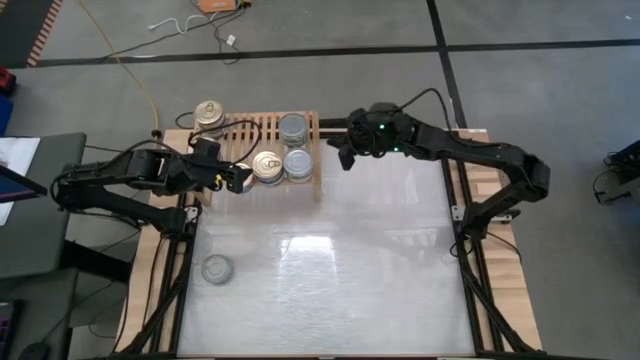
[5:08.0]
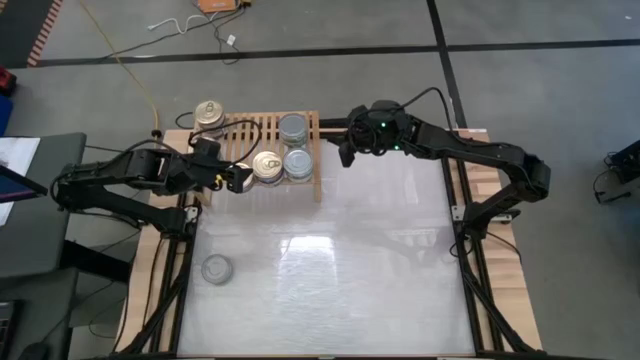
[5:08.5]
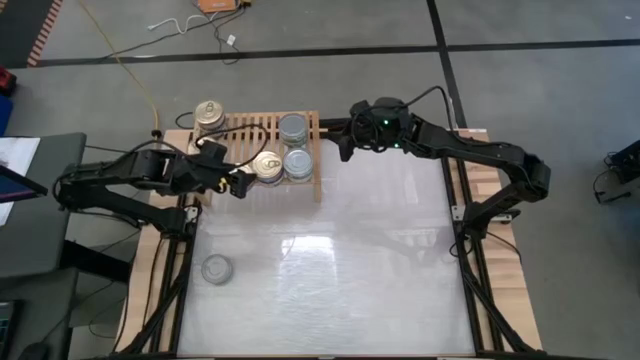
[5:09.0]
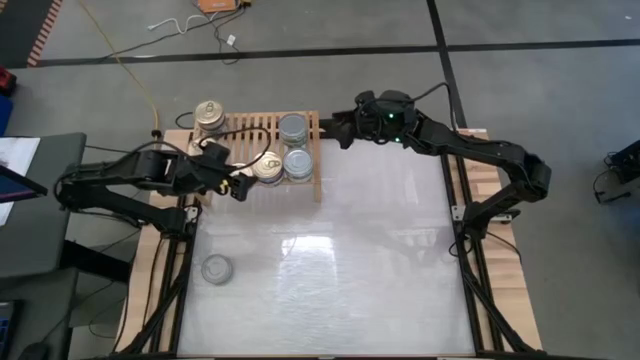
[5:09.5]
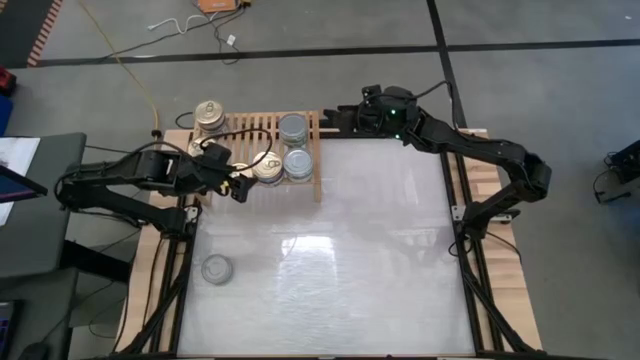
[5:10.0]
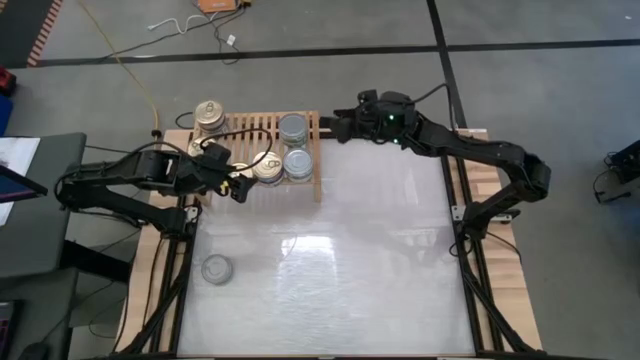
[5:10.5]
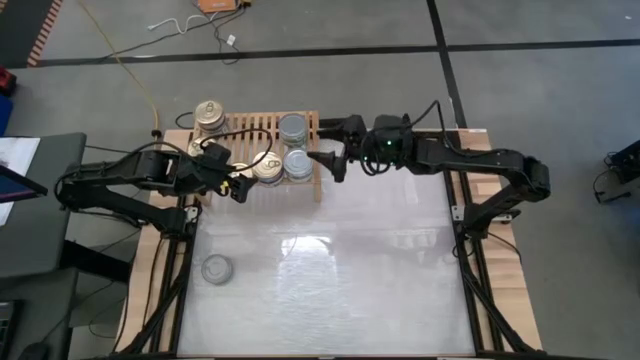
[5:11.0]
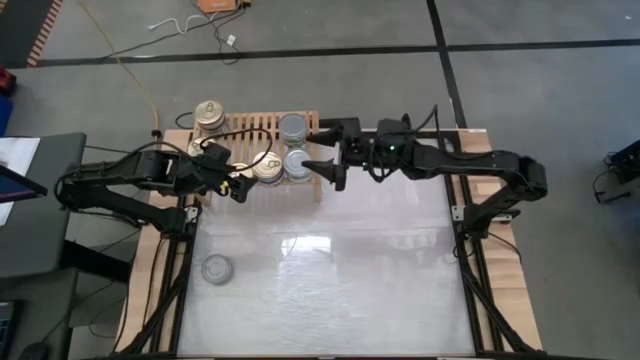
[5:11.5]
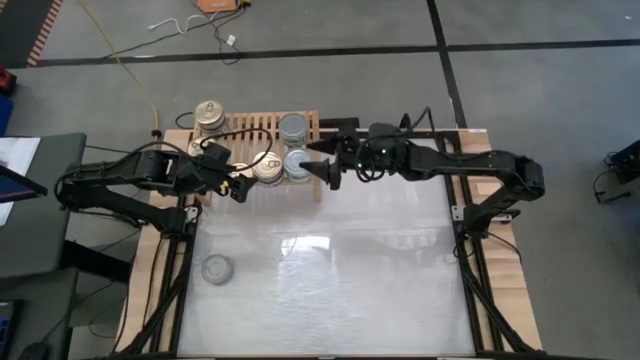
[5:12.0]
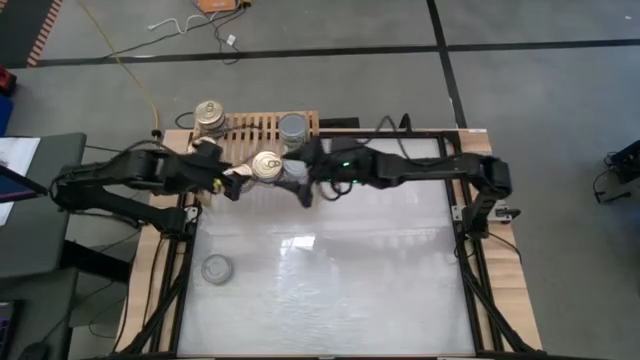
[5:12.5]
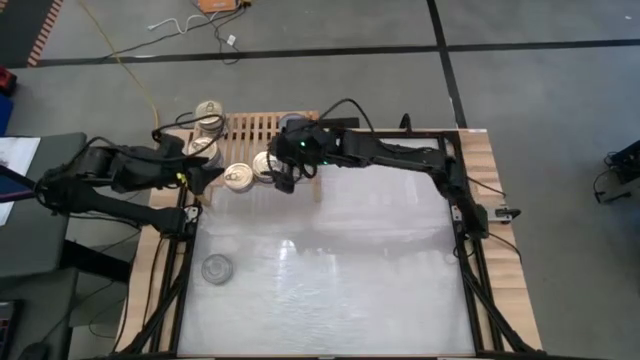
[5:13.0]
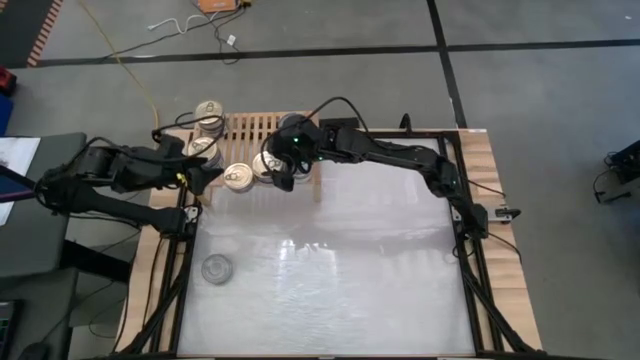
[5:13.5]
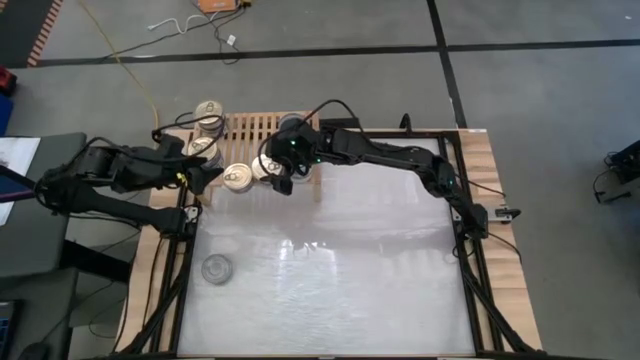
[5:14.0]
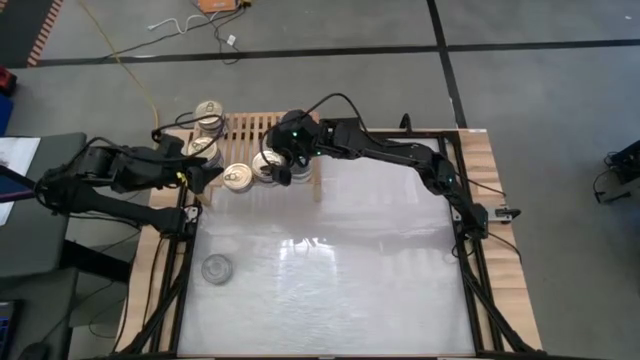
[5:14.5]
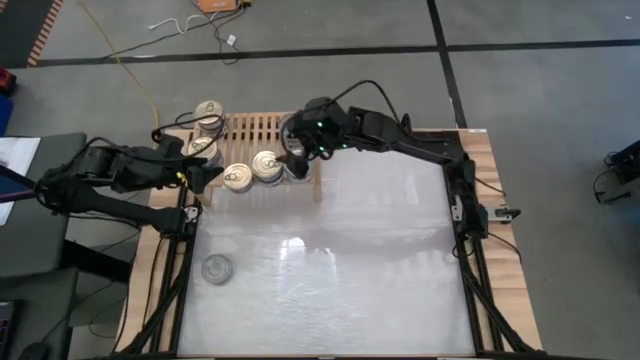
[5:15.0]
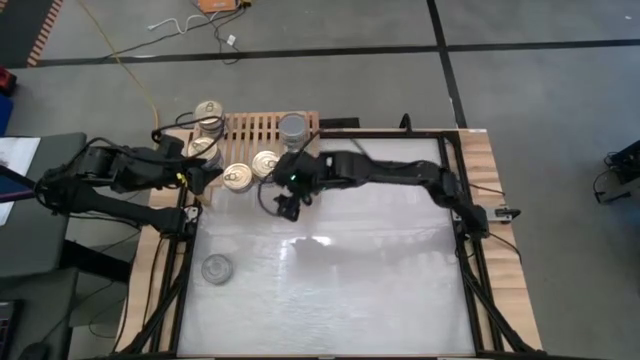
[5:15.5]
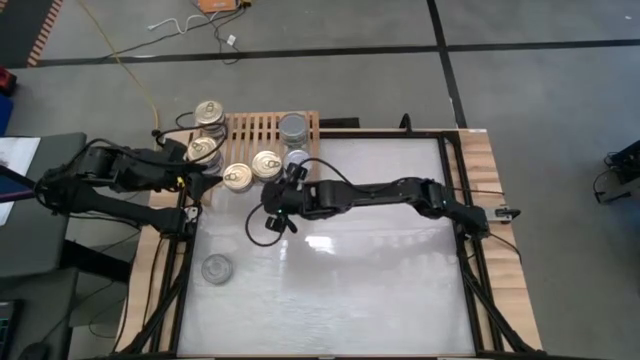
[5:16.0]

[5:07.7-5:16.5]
Task: Stack canned seafood by type on shelf
Adjust the bottom left stacked green tuna cans

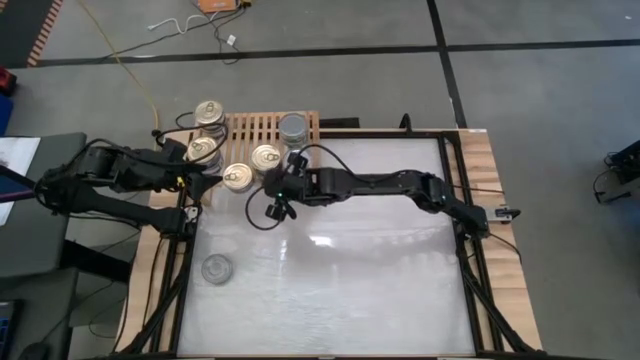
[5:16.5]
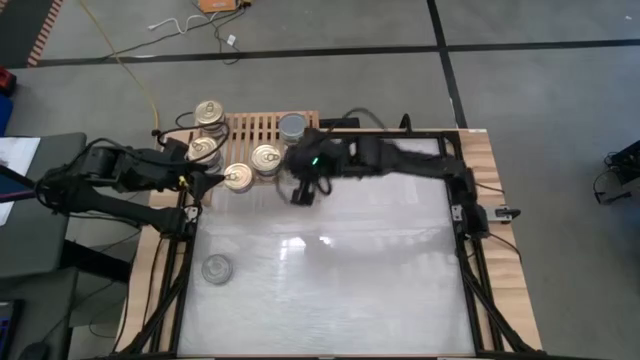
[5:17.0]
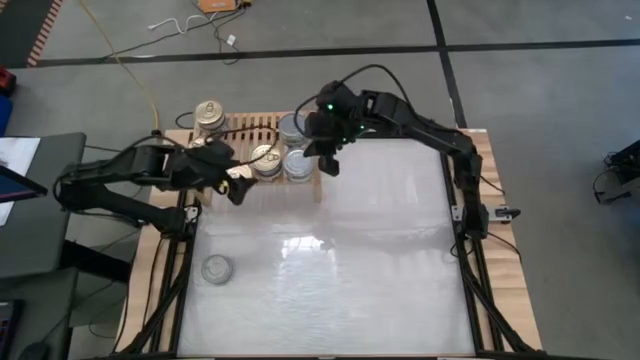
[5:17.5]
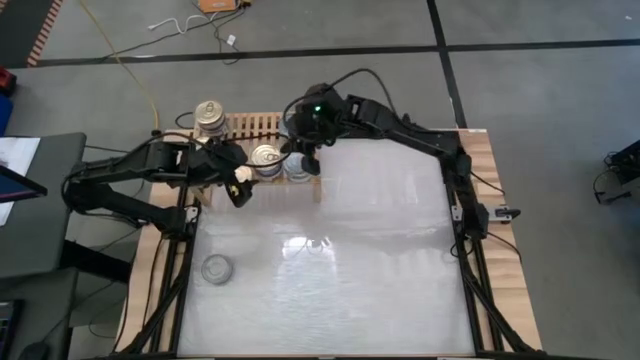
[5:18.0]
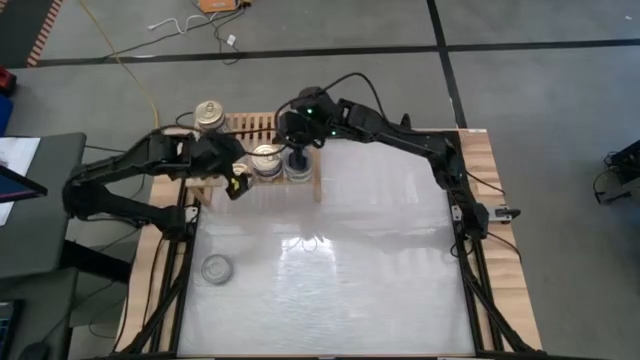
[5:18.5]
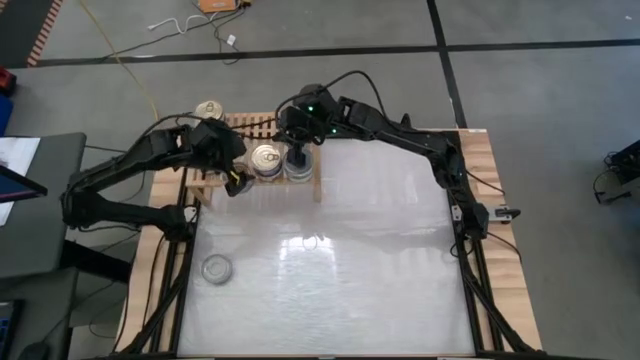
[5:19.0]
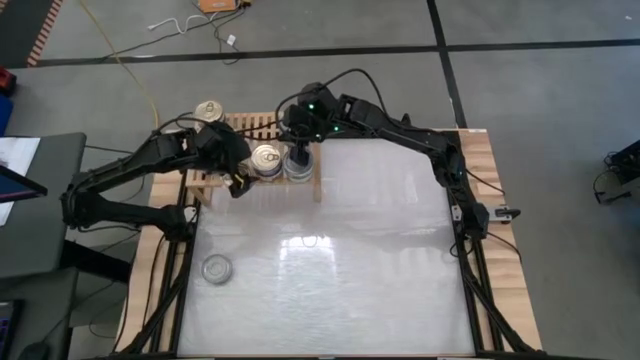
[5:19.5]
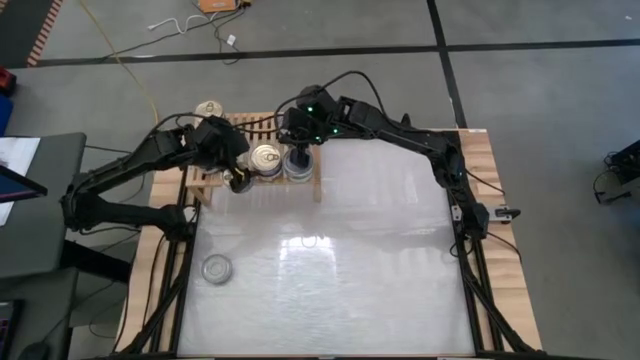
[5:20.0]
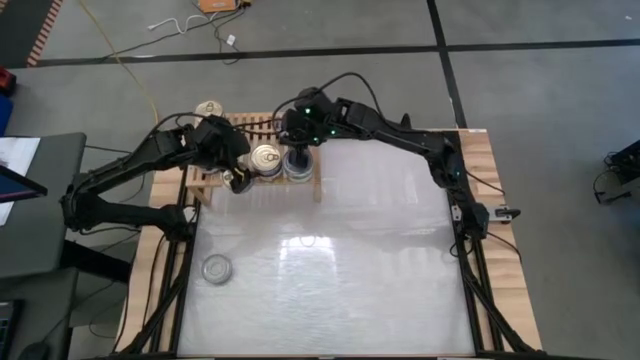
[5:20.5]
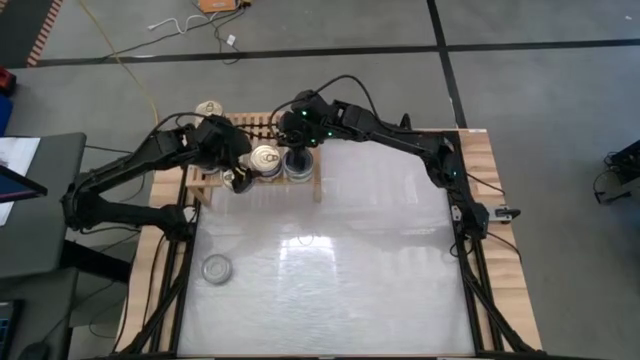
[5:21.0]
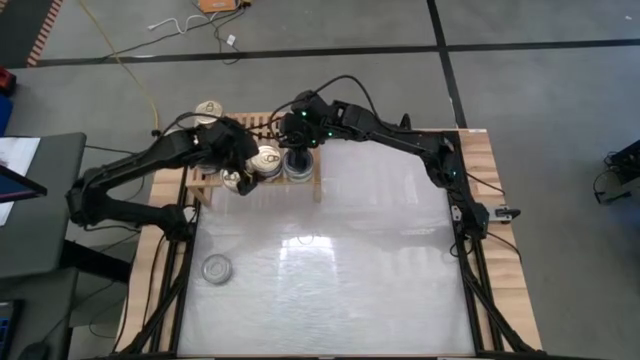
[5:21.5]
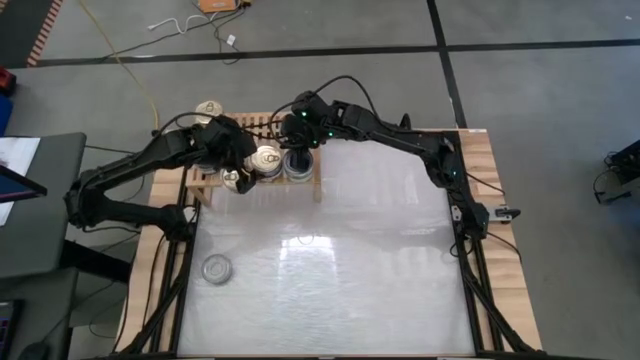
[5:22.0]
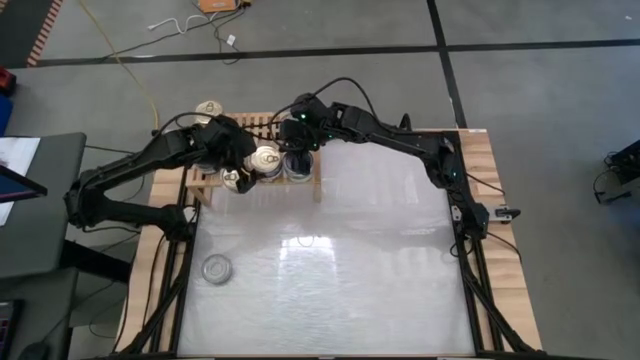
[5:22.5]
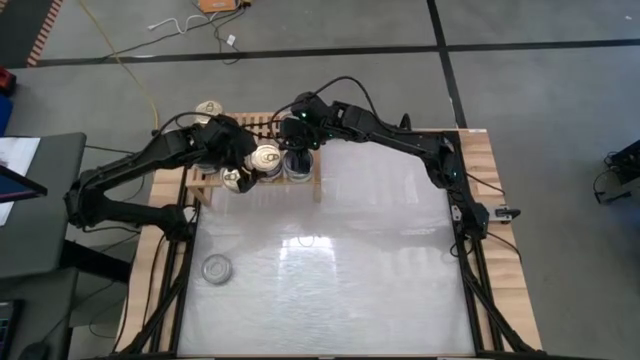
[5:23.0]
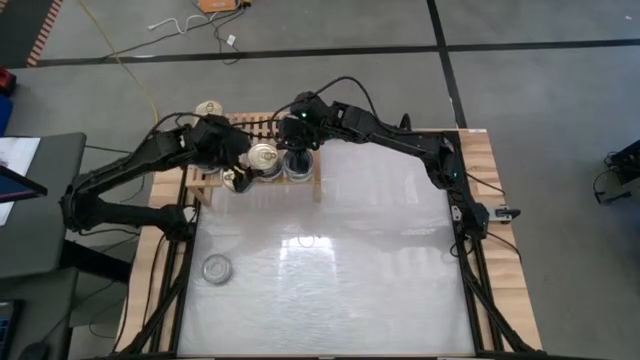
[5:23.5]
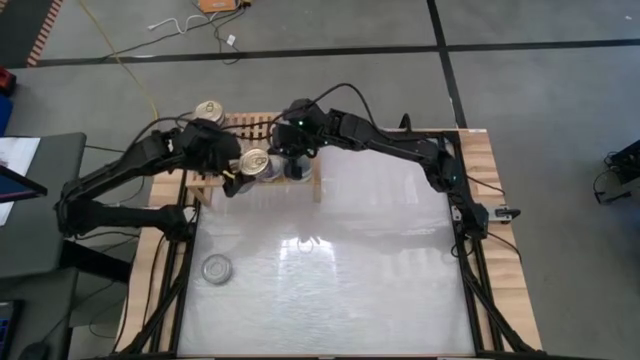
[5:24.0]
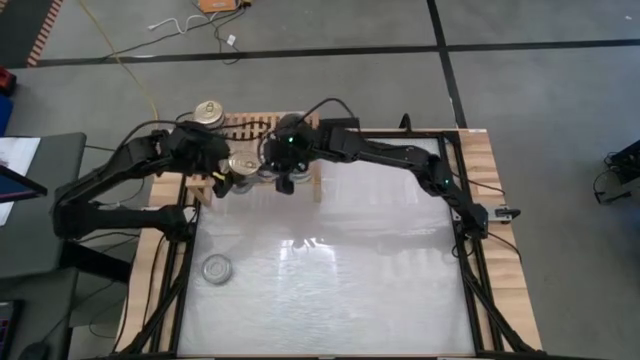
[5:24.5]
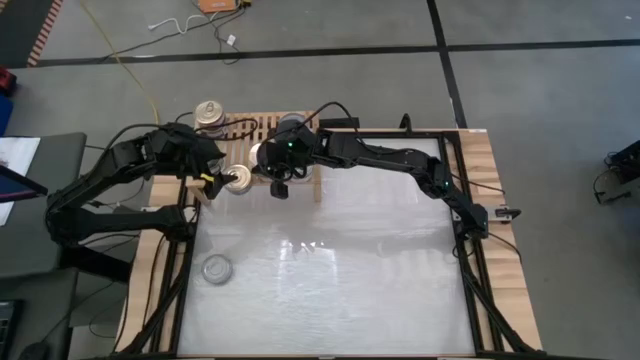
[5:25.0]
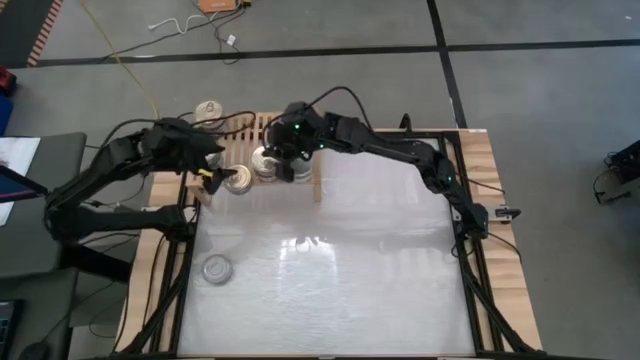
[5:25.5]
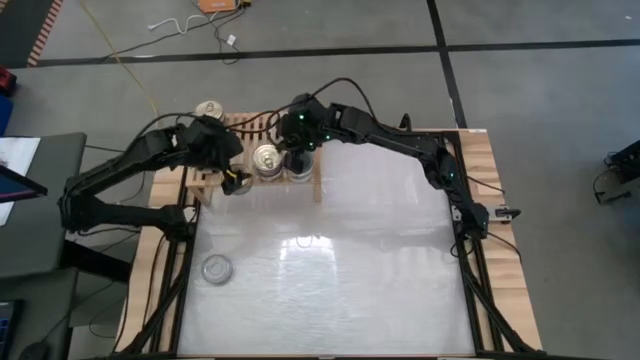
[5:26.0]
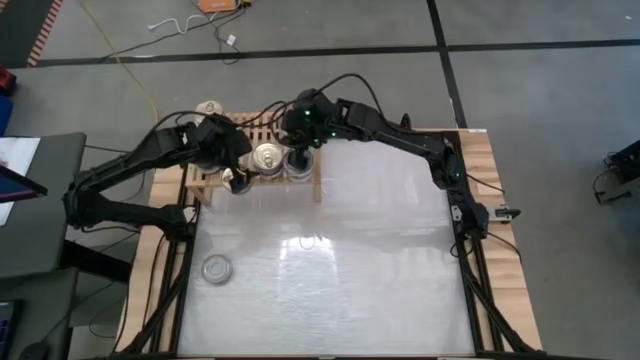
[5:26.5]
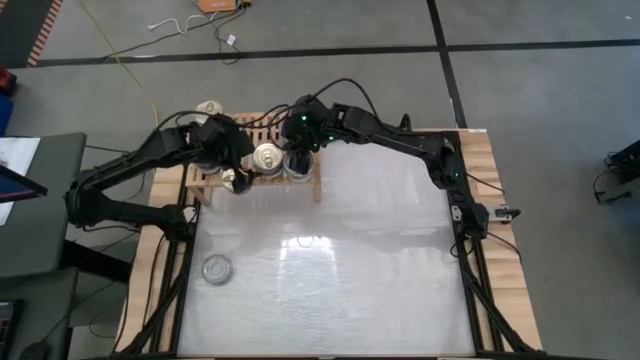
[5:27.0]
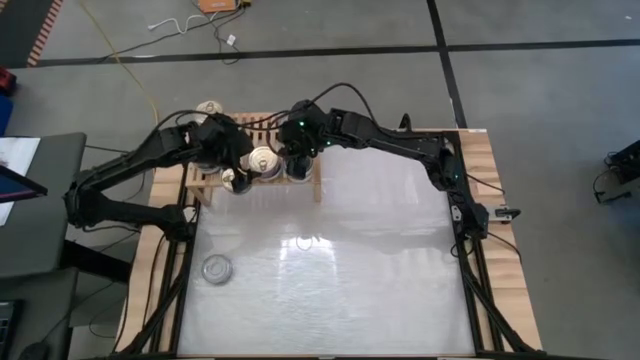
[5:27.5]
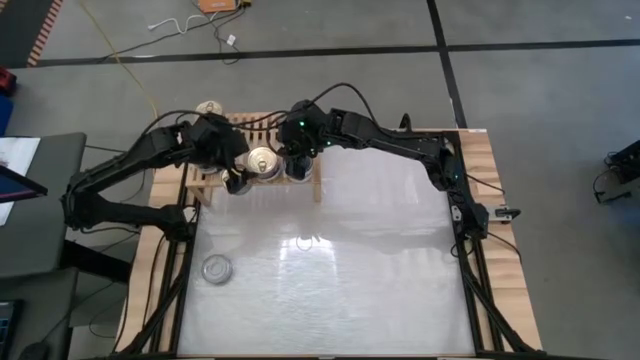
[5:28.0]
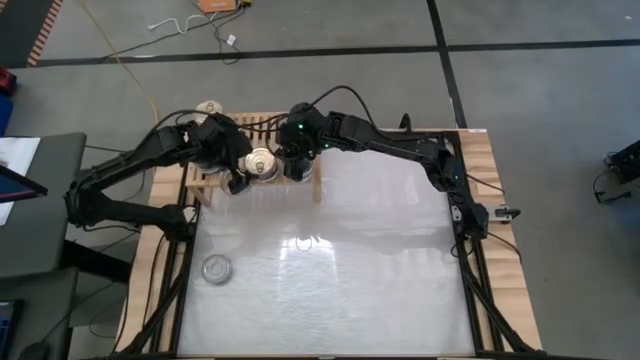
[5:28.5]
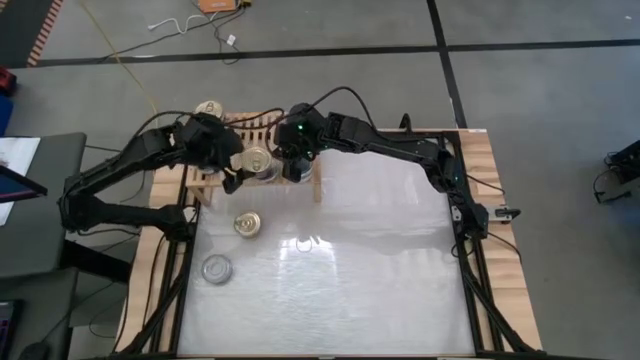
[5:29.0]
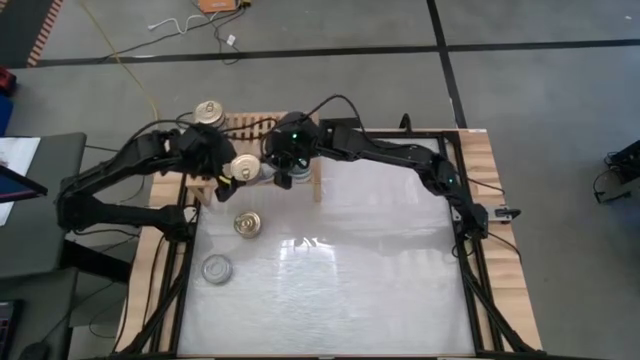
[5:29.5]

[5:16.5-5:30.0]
Stack the blue tuna can on top of the bottom right blue tuna can on the shelf
